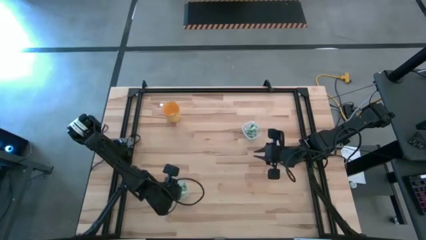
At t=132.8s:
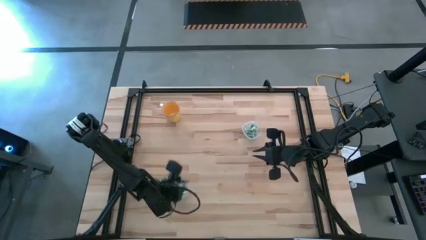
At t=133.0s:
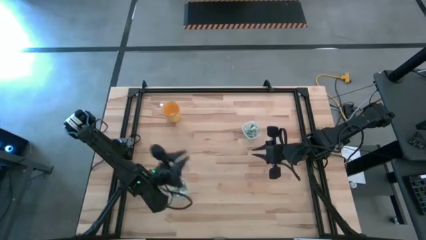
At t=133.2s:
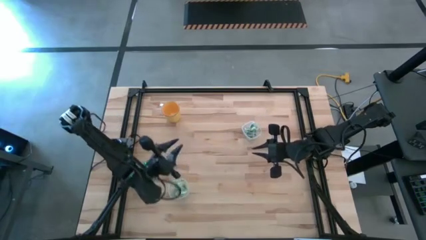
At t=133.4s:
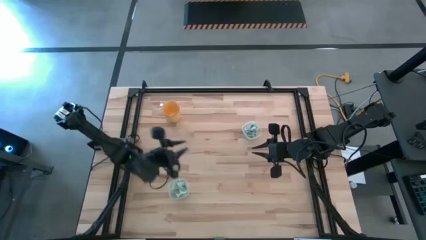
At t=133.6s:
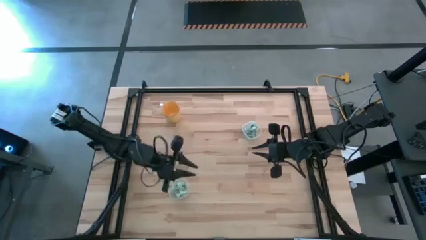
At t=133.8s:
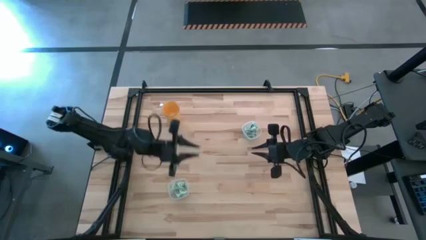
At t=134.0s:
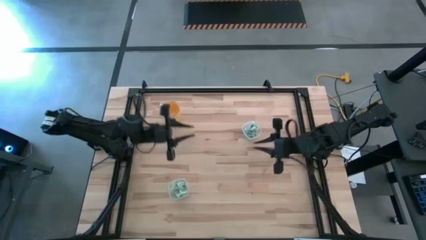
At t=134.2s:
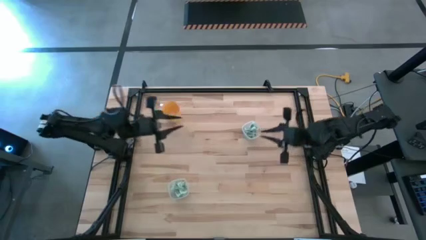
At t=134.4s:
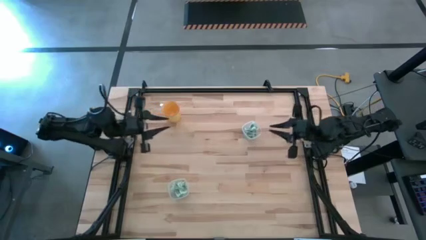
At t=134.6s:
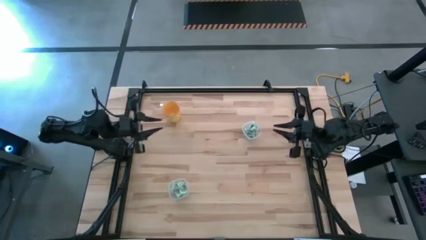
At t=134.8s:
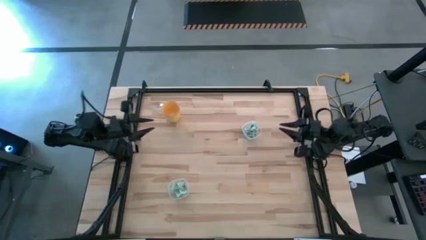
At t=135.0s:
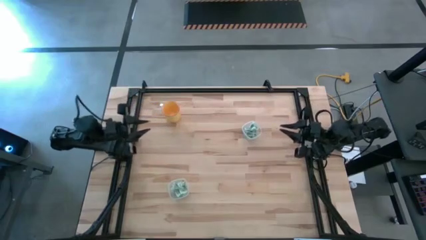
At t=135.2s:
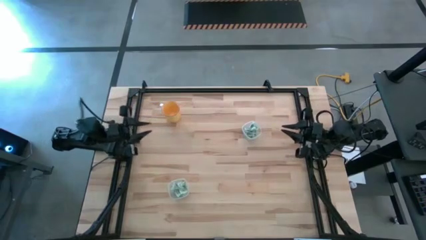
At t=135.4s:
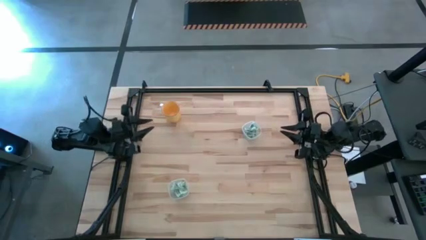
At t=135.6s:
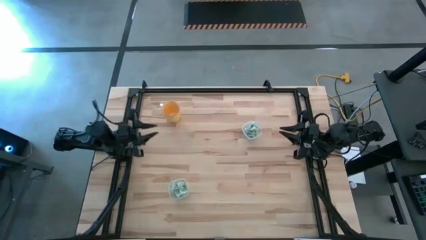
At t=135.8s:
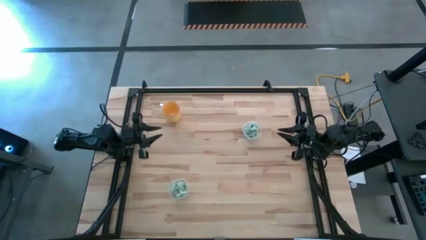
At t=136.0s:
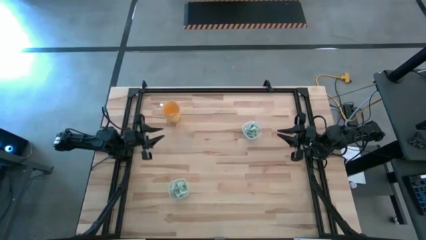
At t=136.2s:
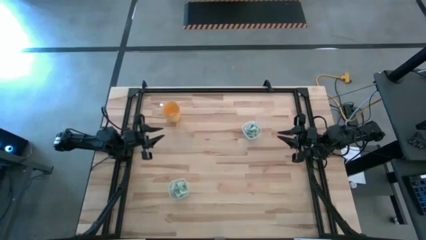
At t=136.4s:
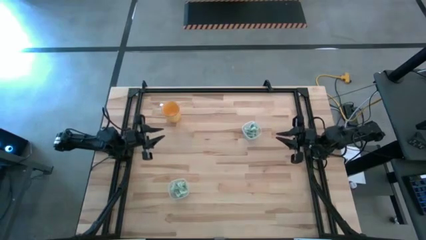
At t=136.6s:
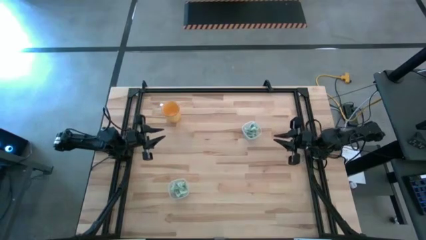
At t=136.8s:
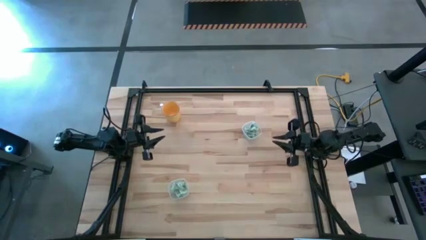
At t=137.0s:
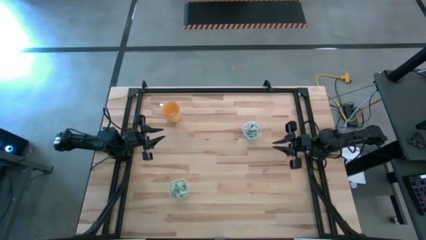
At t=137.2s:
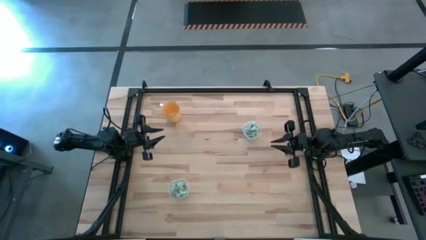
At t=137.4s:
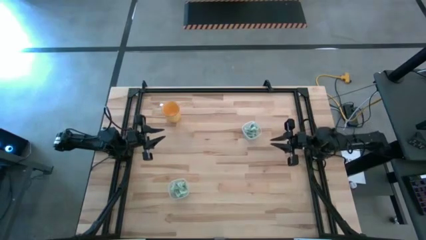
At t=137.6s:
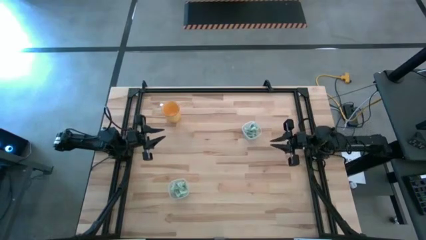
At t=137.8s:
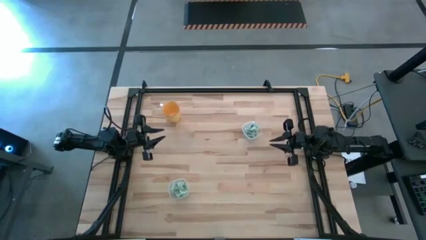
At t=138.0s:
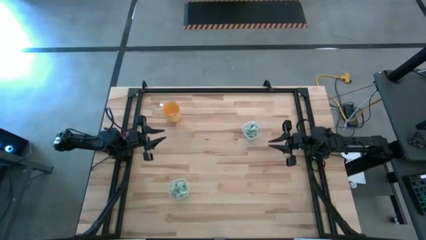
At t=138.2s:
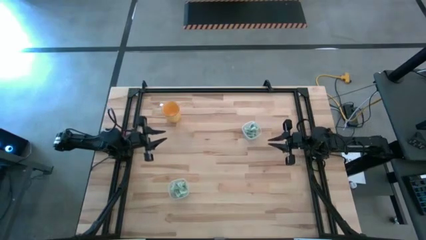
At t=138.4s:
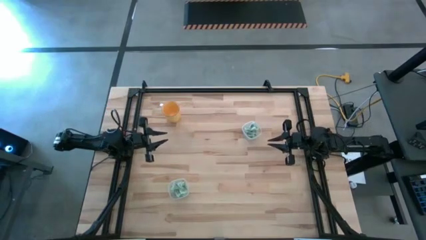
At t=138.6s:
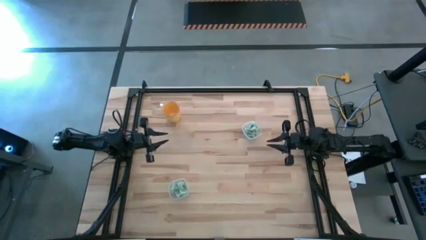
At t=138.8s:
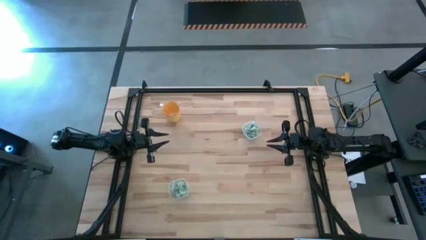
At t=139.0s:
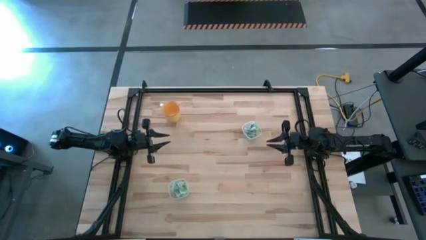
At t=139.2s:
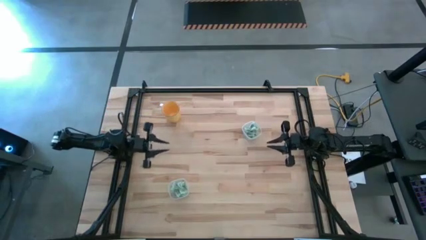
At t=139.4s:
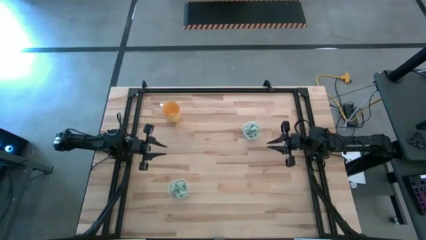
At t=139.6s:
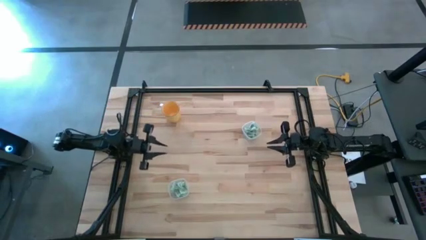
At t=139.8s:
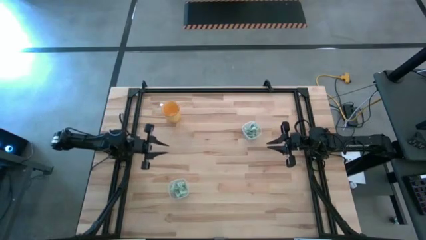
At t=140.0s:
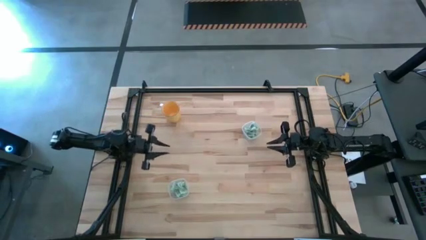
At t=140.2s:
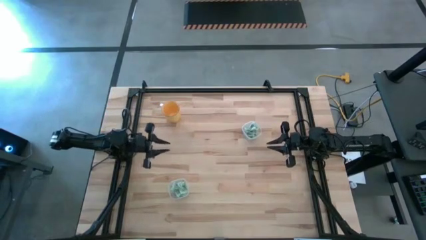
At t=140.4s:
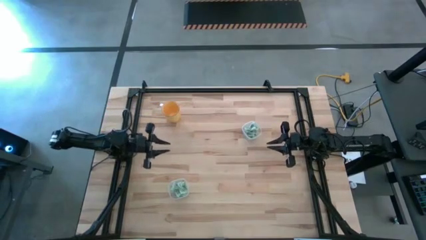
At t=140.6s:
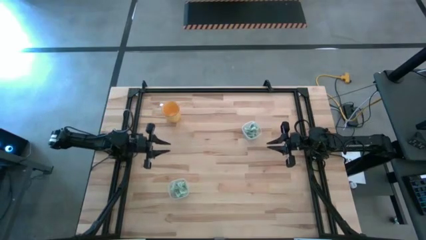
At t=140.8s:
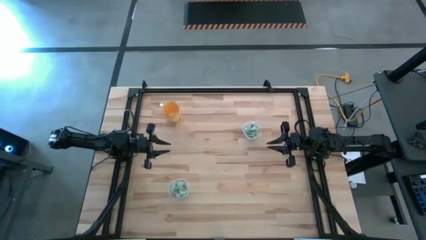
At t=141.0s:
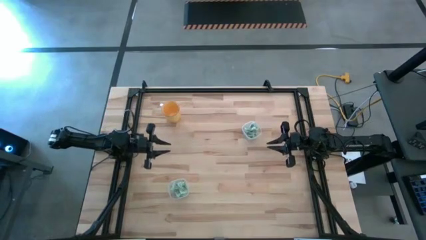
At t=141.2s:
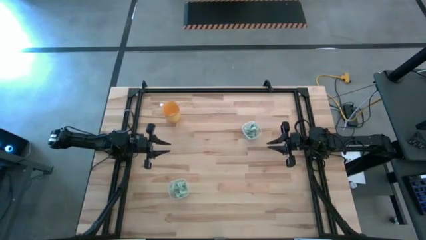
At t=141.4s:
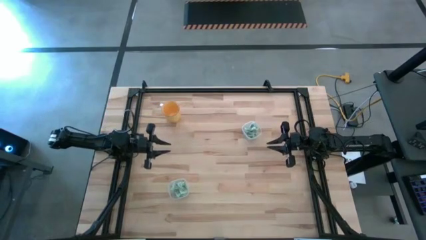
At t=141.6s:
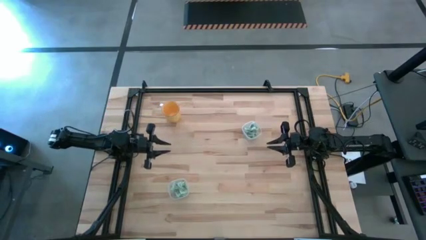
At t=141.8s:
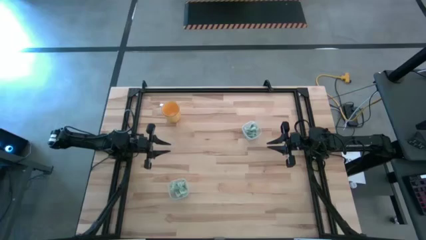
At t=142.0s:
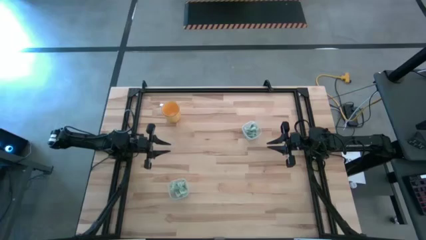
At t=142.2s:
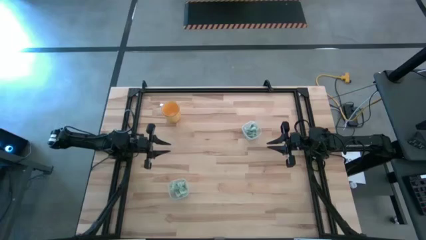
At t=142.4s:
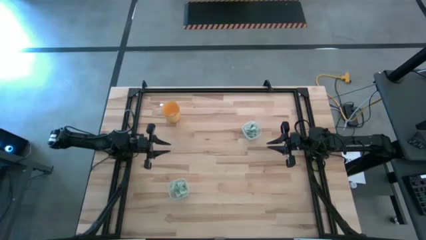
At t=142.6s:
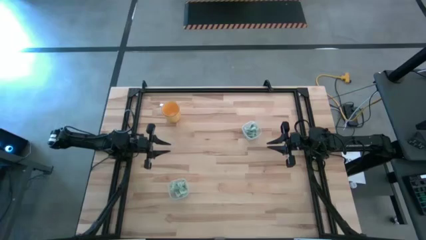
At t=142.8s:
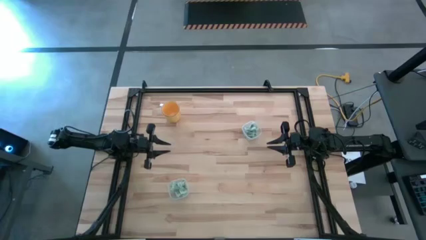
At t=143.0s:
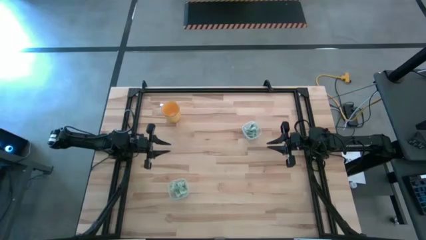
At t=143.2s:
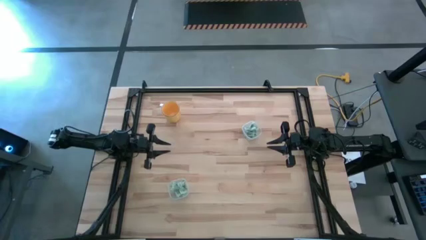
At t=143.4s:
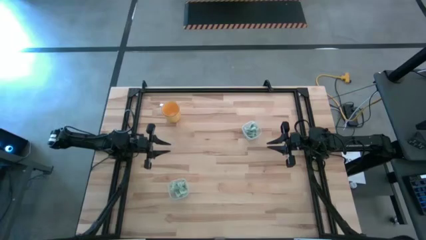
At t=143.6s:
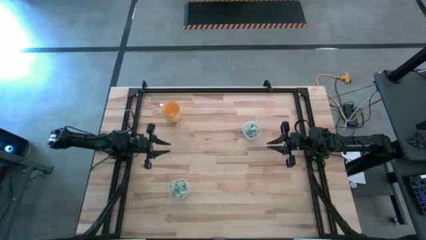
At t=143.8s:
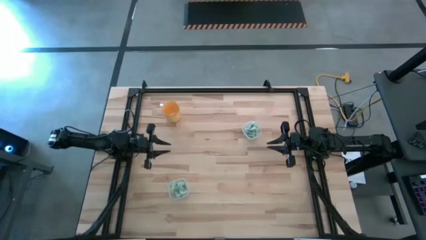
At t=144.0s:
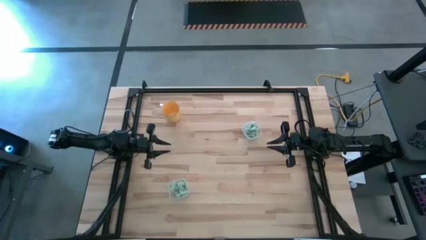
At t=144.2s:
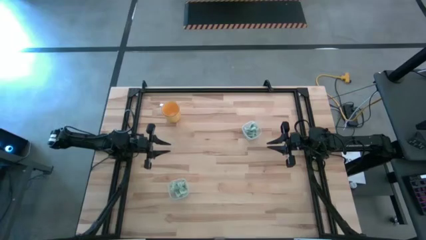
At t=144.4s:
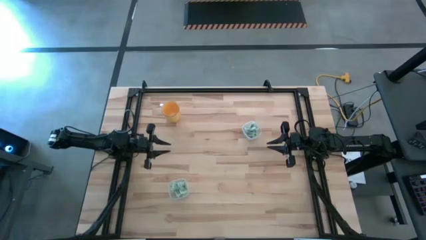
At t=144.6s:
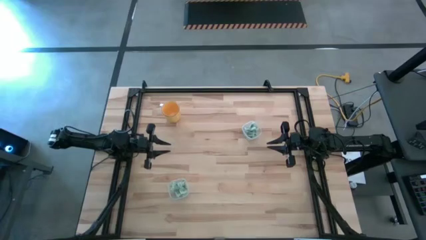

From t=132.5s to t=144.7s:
Task: Pick and place Stevia / Truvia into bins
Return to Home Position

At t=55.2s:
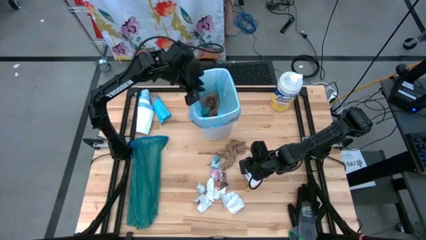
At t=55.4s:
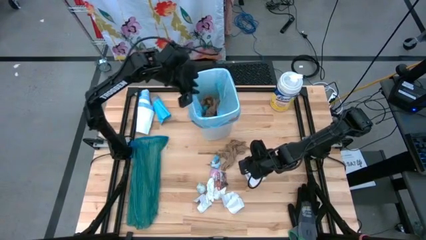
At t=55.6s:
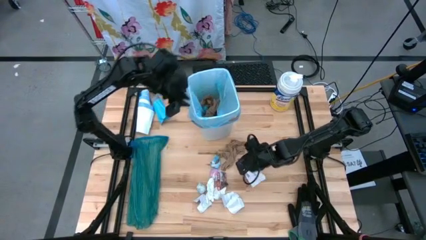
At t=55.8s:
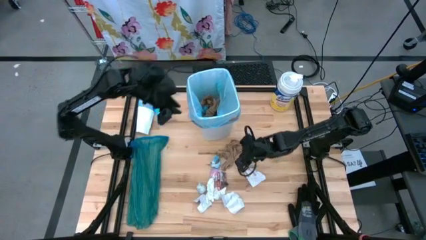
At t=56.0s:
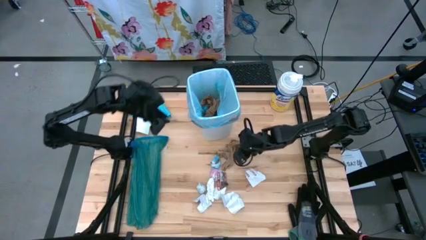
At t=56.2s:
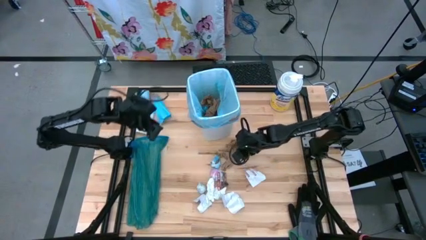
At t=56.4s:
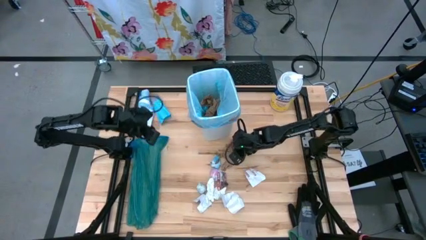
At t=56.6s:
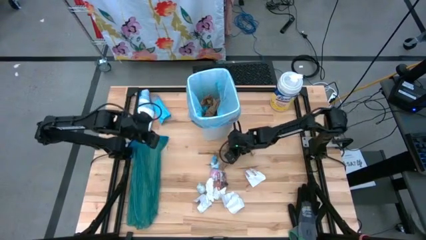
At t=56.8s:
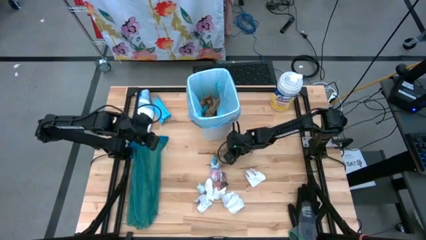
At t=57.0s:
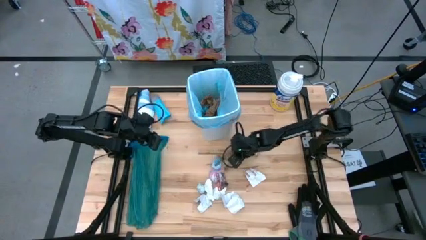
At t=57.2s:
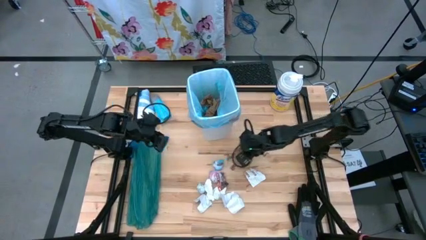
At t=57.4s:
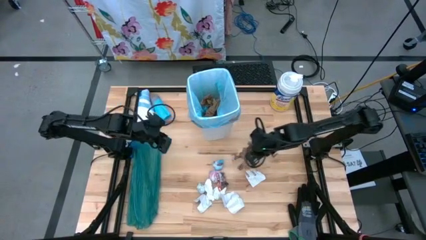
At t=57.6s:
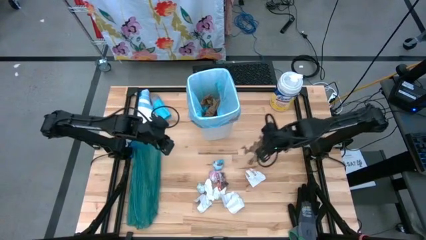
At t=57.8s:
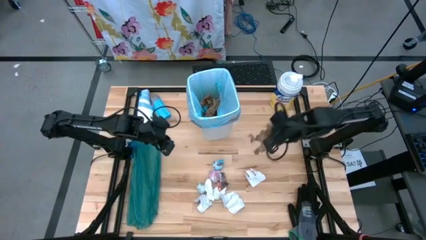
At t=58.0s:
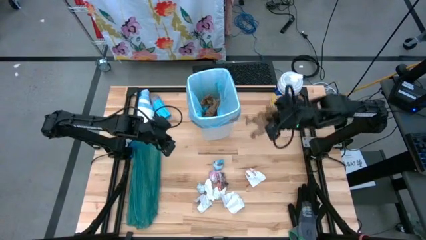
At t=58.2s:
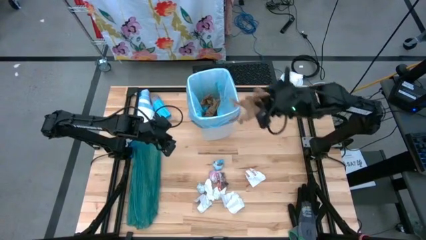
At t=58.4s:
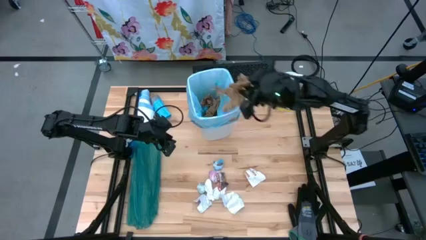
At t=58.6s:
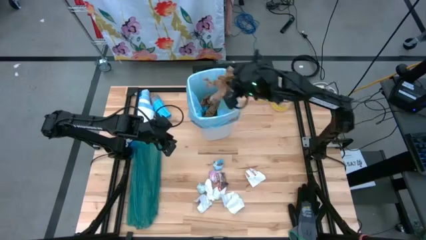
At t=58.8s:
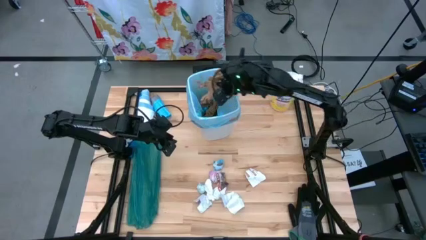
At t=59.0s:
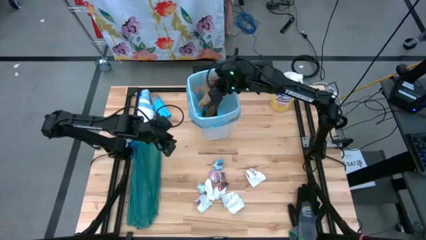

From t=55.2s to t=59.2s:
Task: place trash/remove bag and relplace
Put the brown napkin into the trash bin

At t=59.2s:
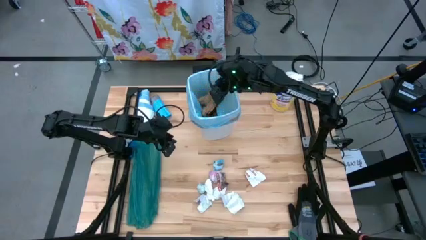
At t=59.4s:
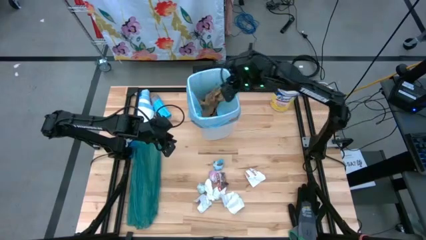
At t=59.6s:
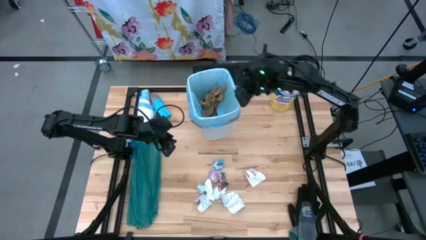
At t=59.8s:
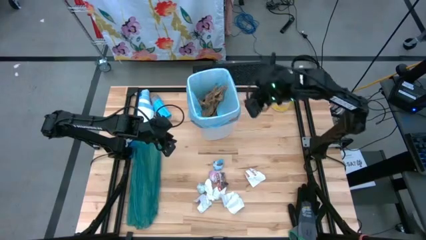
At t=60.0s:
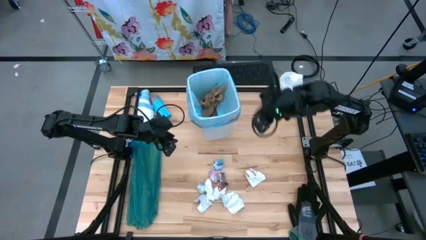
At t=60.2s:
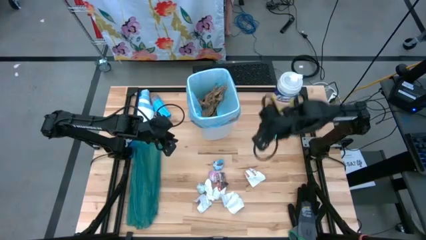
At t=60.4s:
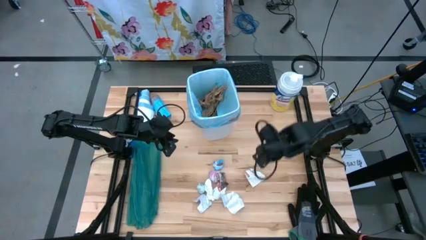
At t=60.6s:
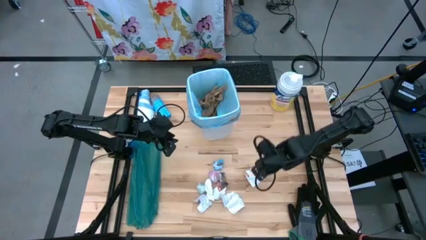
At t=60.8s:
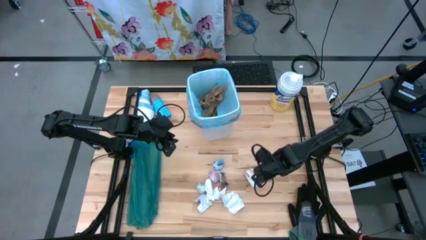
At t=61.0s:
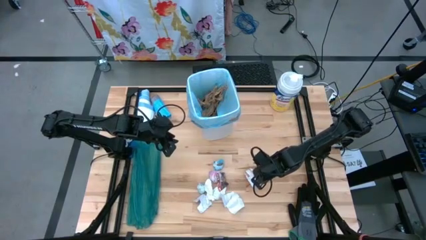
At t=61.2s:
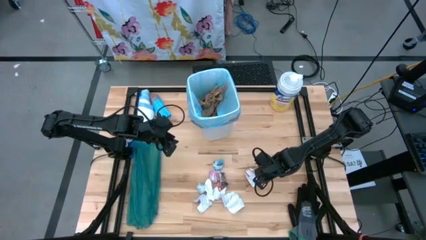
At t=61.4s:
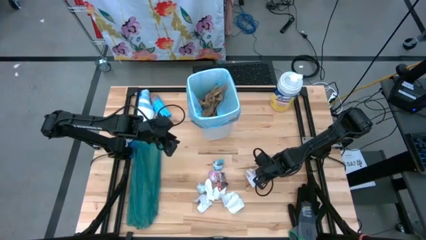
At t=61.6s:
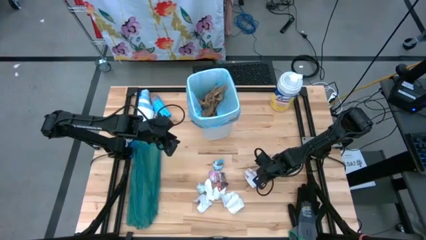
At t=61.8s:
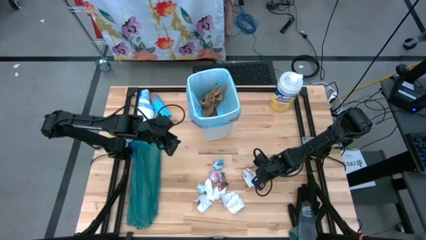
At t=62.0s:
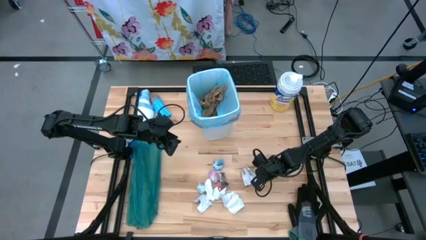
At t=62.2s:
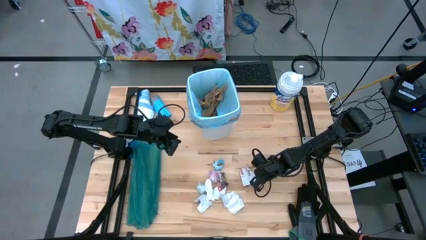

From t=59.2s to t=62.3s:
Put the white paper into the trash bin
